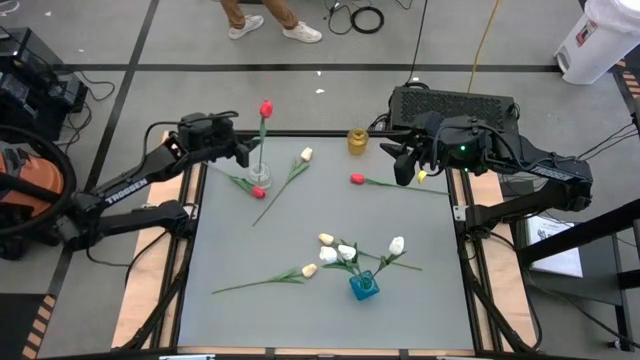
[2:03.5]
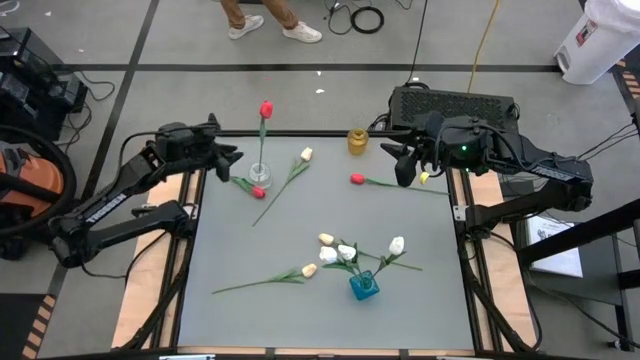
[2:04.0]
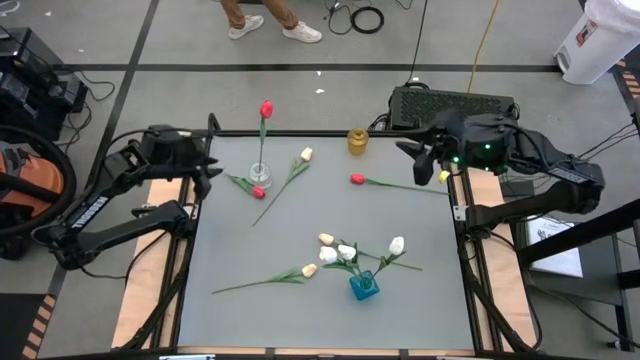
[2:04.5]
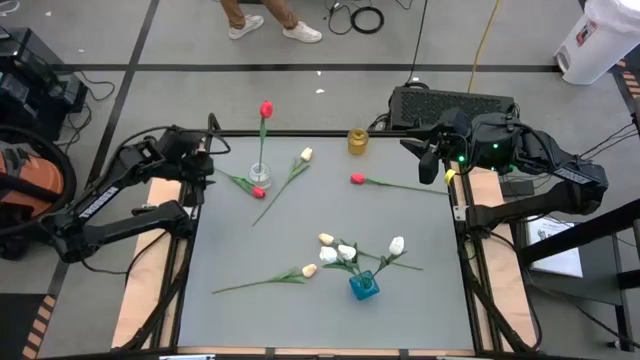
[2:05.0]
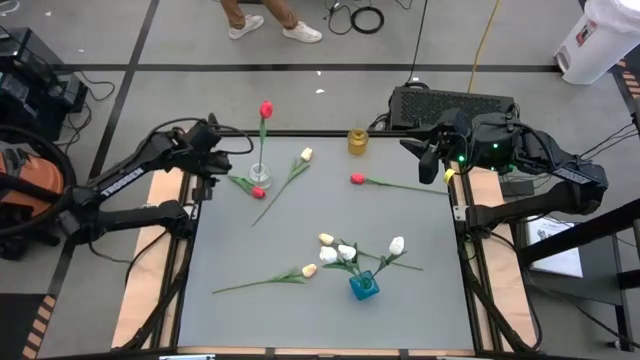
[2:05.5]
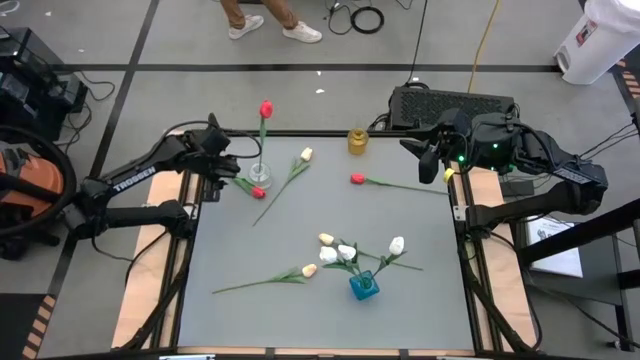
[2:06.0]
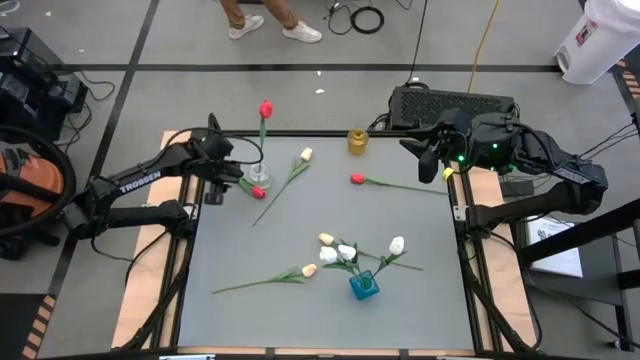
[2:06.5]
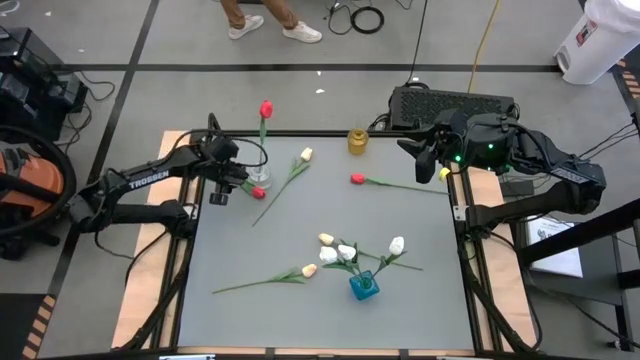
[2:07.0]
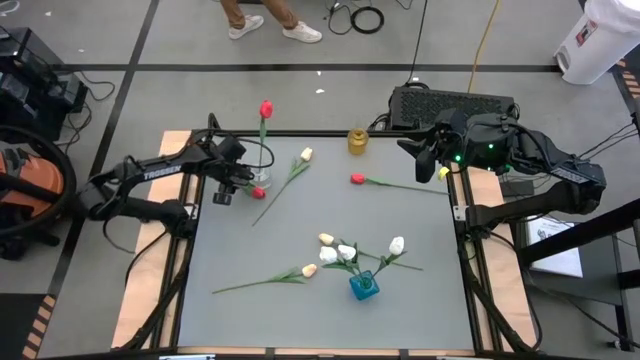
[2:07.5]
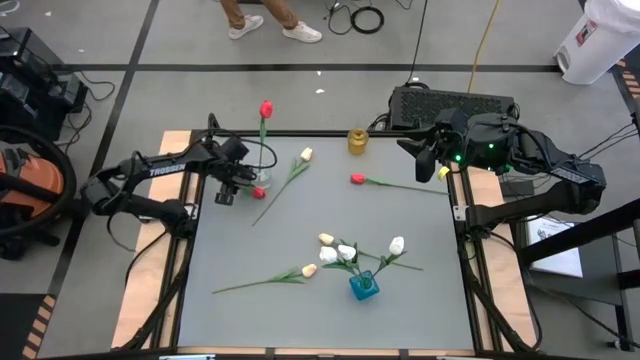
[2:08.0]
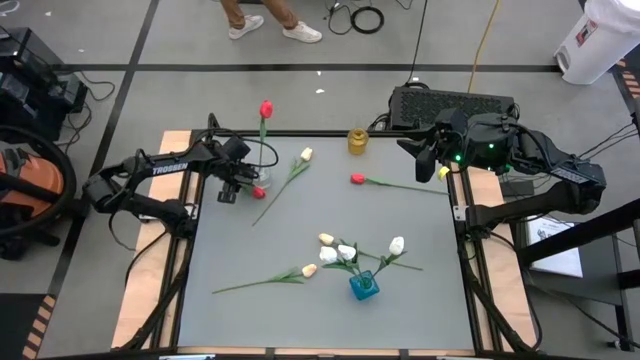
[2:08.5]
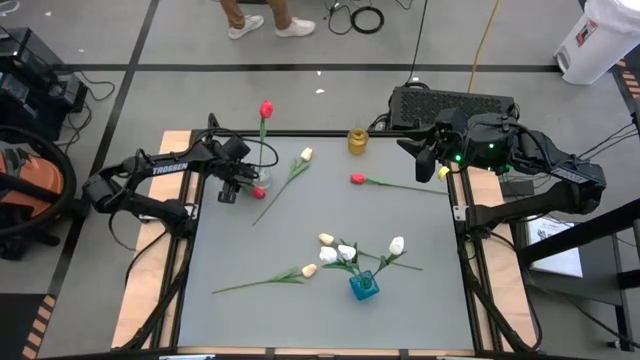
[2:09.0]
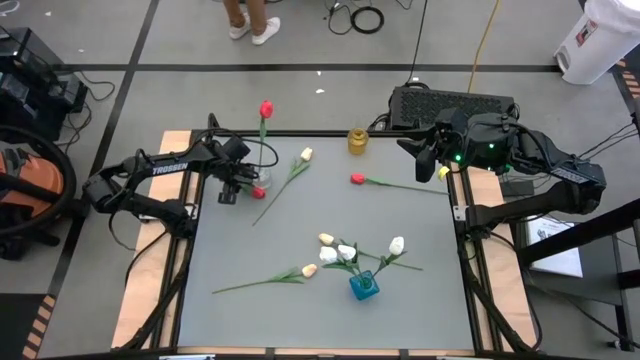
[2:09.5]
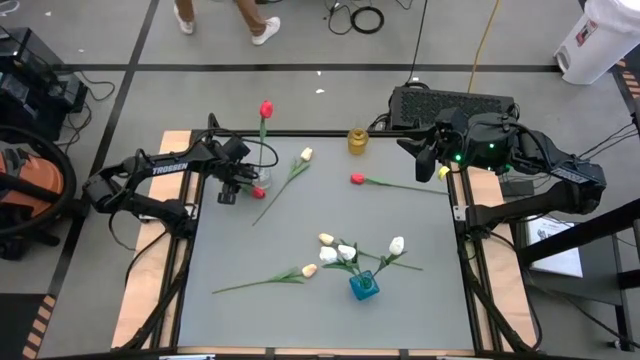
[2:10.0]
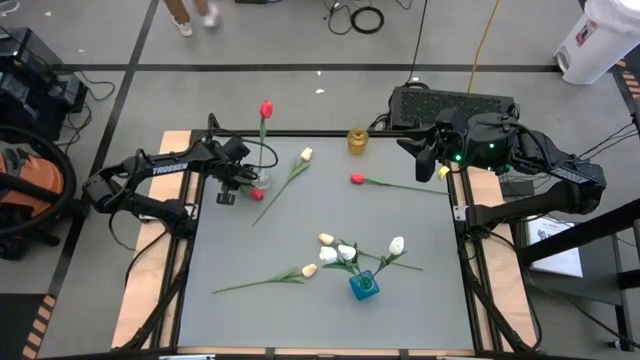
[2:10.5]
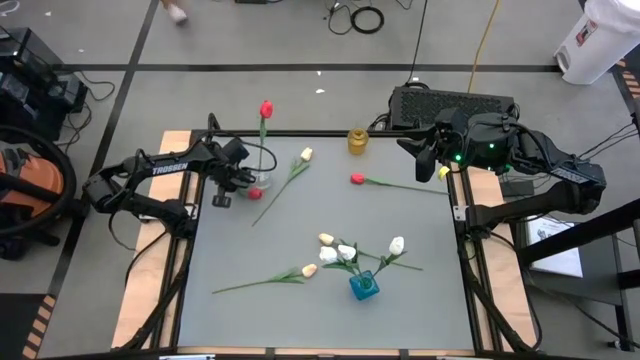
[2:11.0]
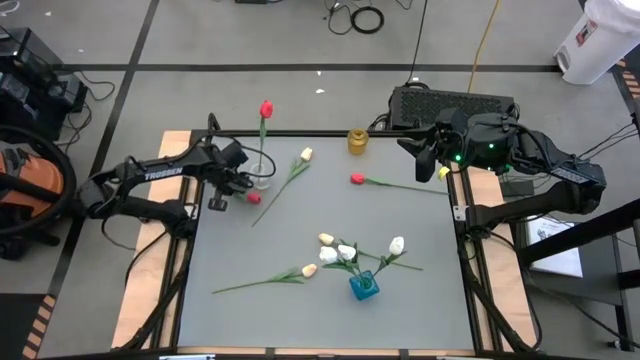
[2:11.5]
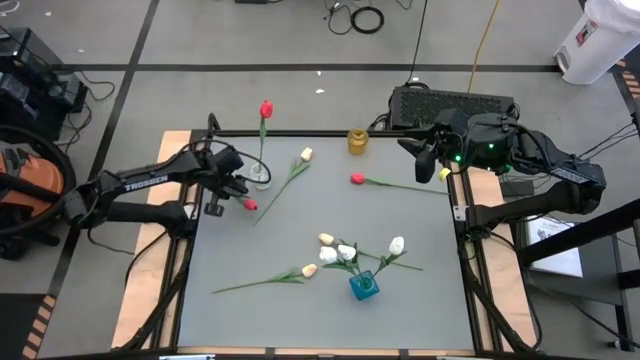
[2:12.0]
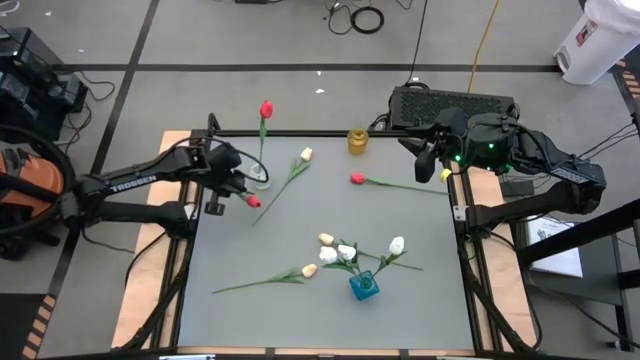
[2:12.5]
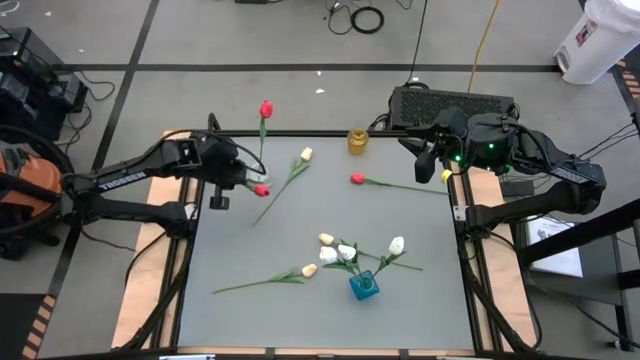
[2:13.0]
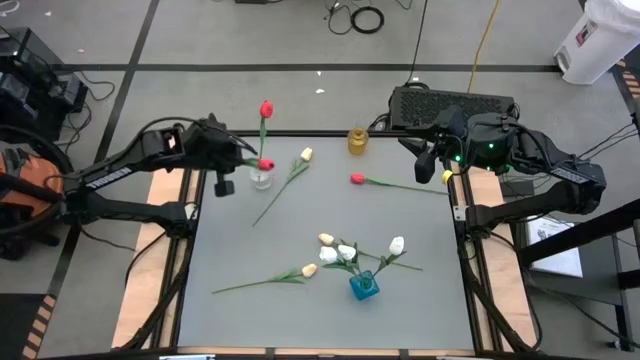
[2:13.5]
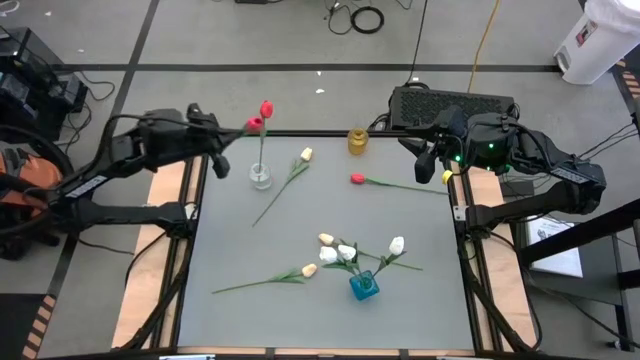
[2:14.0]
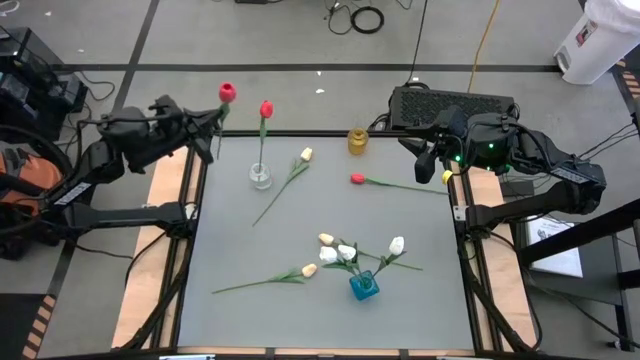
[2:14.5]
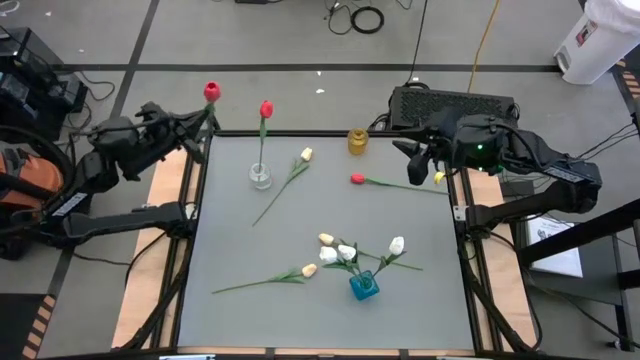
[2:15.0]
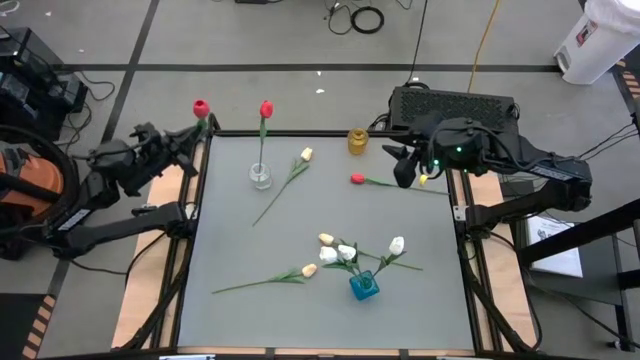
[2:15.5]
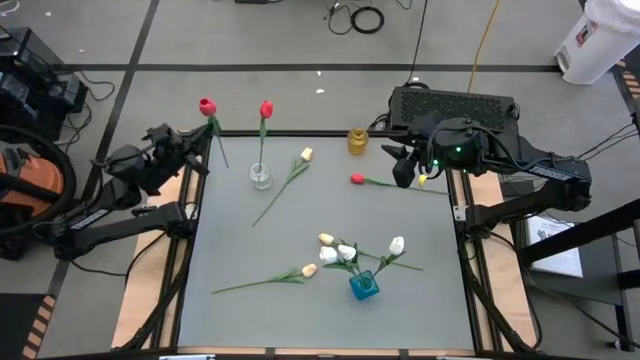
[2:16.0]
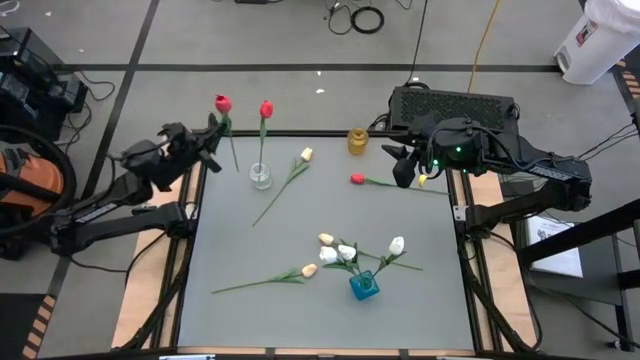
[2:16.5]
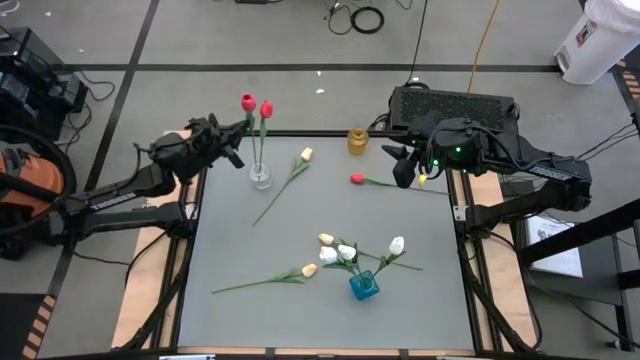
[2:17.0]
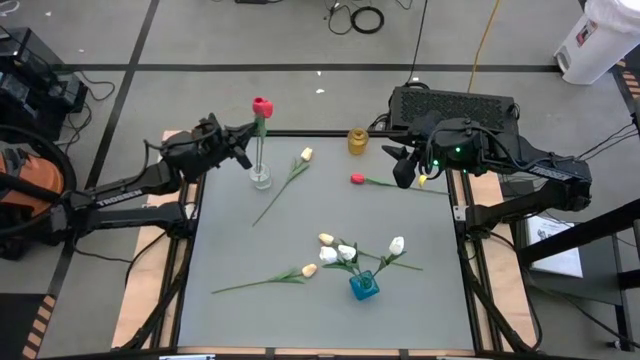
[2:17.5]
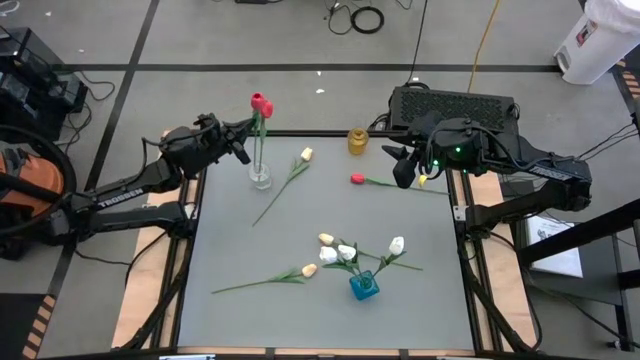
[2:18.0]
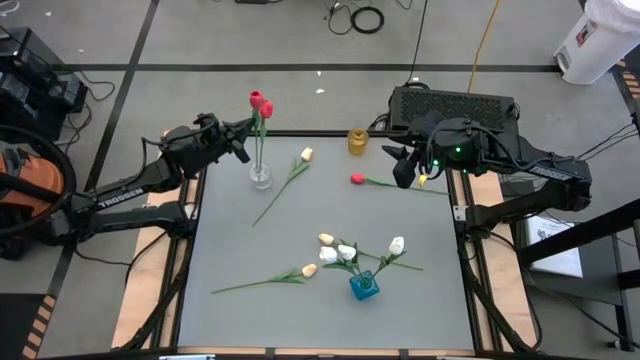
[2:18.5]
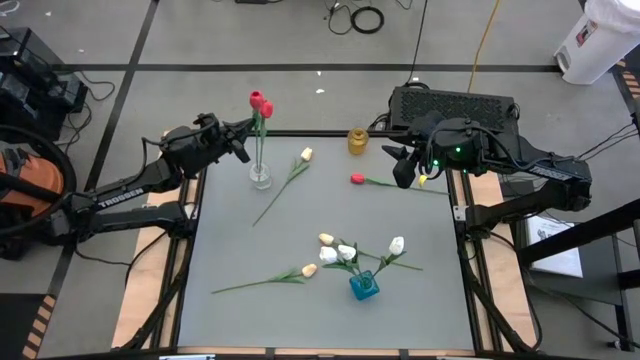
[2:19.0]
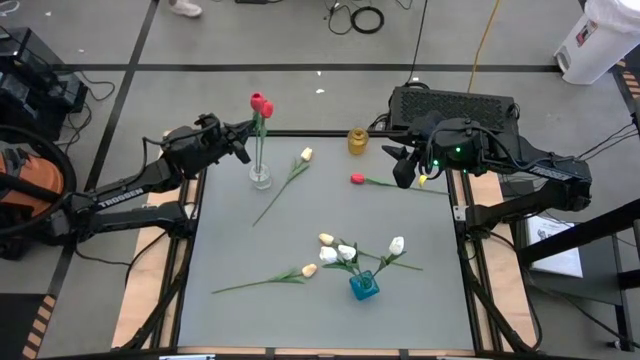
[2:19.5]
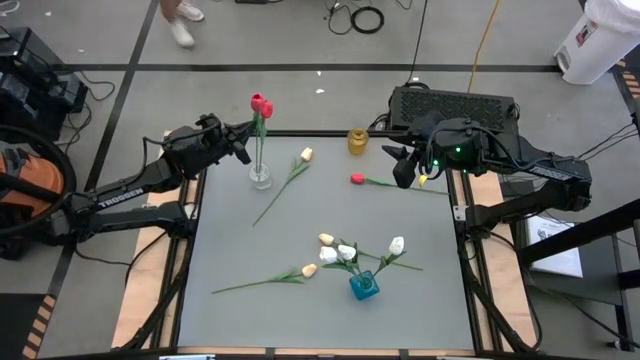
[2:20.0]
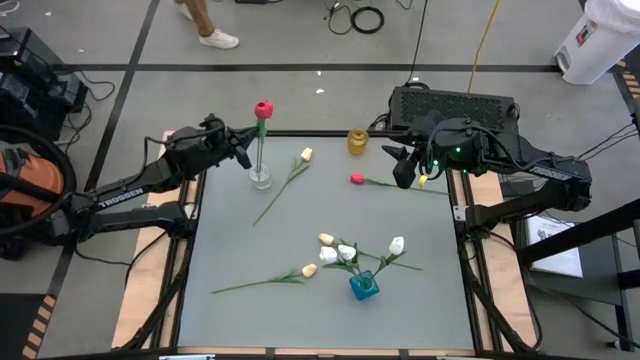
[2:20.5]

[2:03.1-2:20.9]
Task: Sort flowers into vase by color
Put the left red tulip into the transparent vase

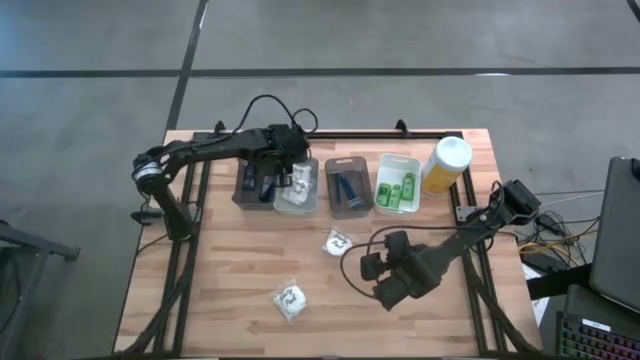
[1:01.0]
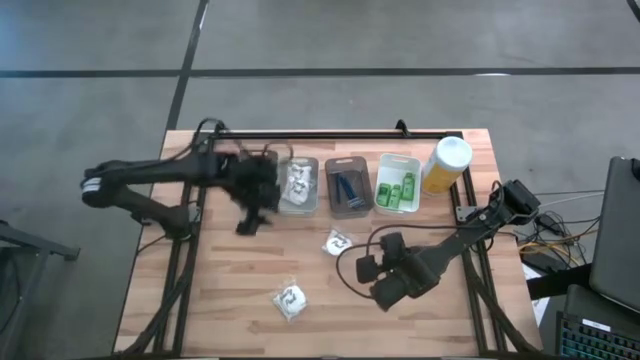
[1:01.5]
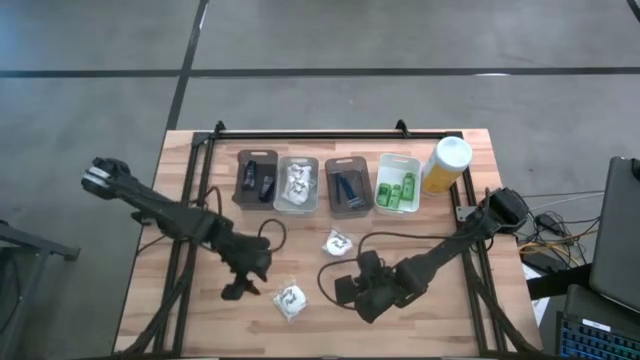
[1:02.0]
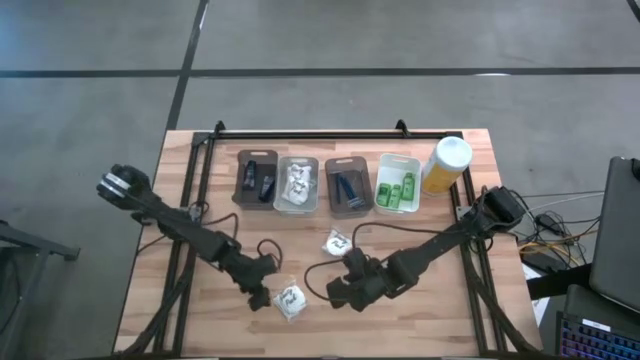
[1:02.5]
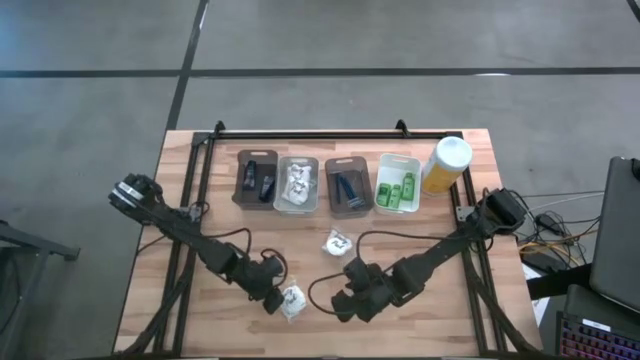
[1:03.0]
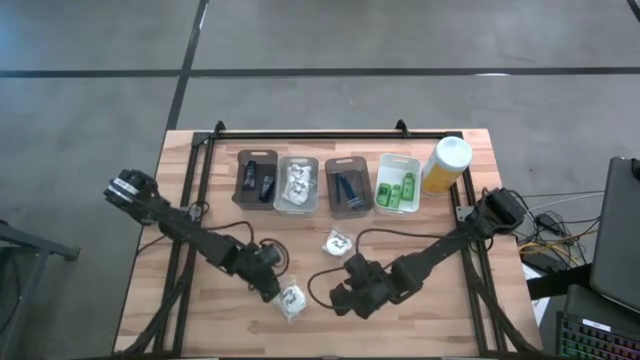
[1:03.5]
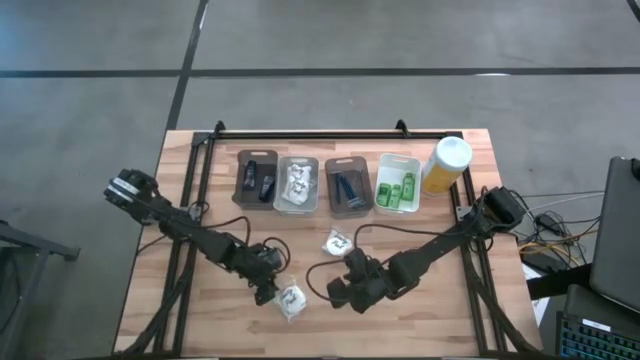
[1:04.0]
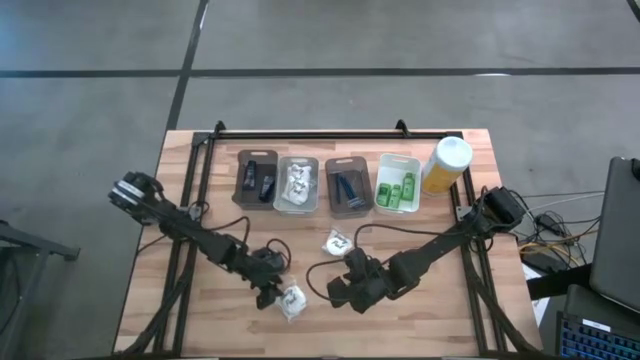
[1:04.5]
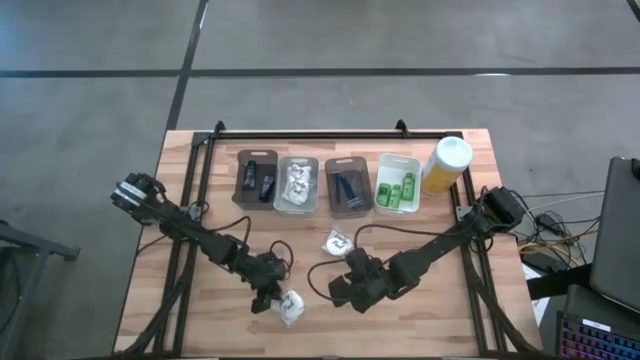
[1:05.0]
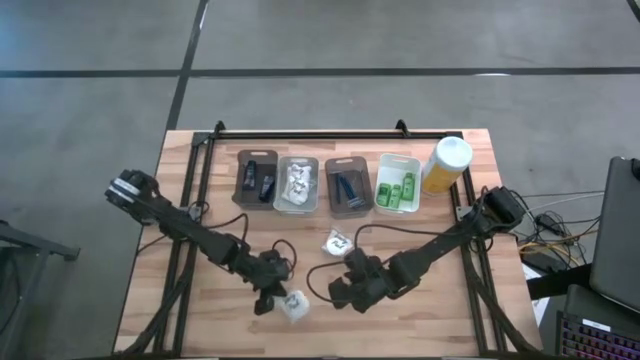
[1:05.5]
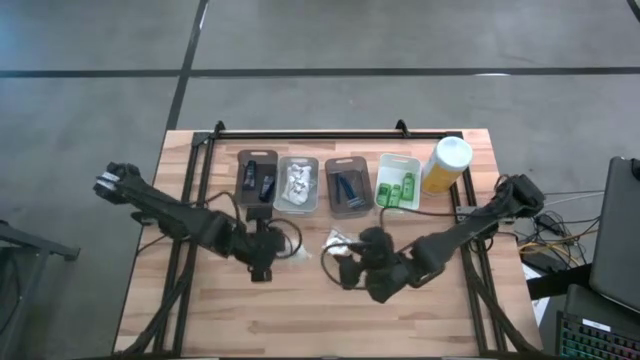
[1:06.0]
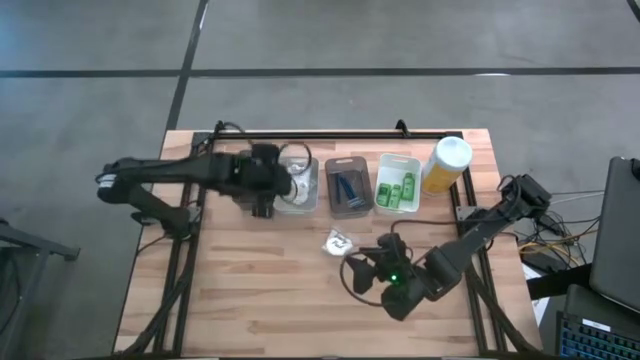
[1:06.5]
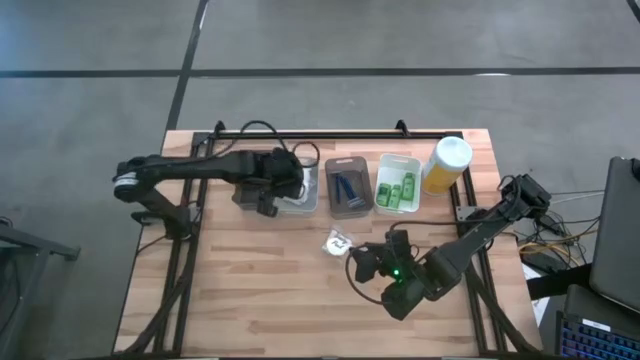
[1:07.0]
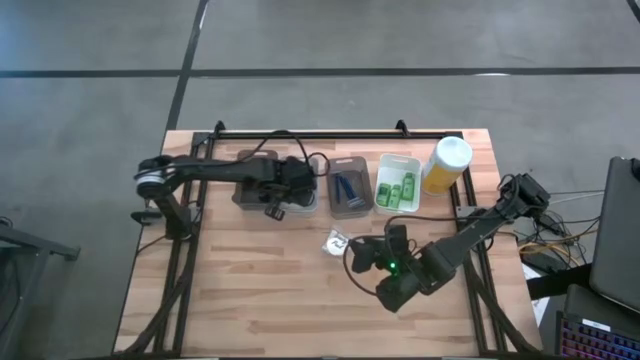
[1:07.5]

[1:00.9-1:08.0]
Task: Pick & Place Travel size toiletries
Put the white cotton pack into the gray bin
